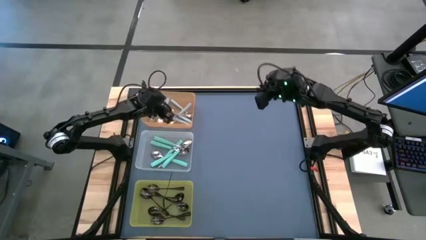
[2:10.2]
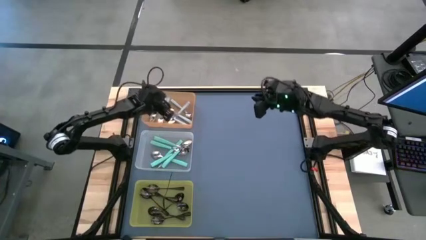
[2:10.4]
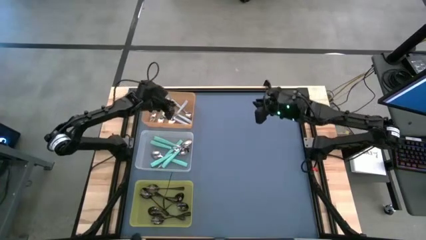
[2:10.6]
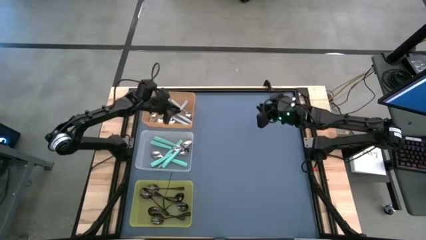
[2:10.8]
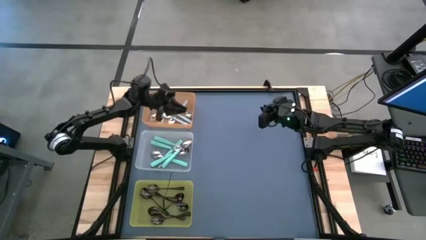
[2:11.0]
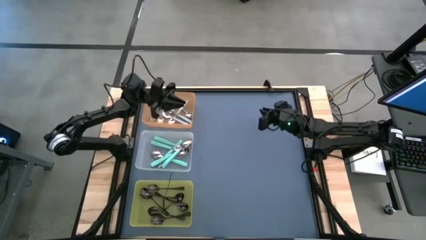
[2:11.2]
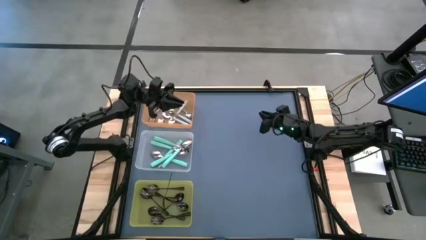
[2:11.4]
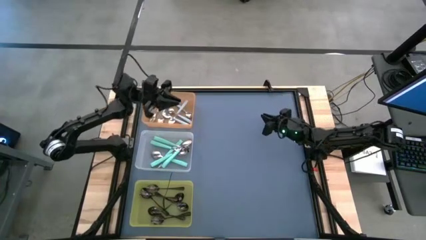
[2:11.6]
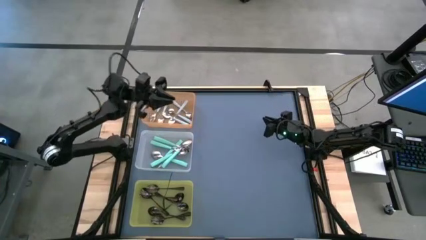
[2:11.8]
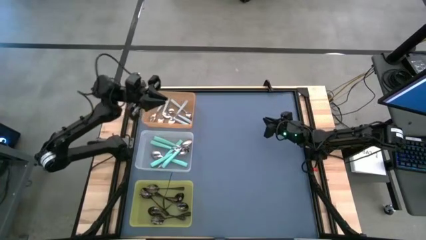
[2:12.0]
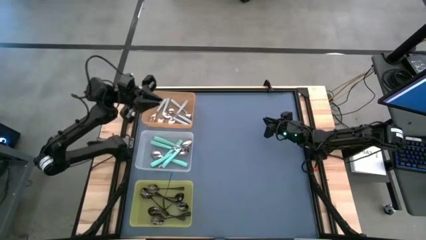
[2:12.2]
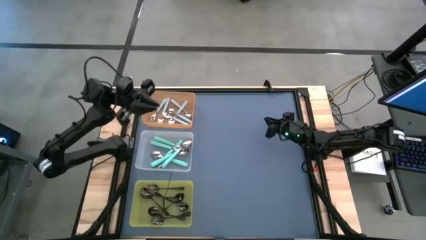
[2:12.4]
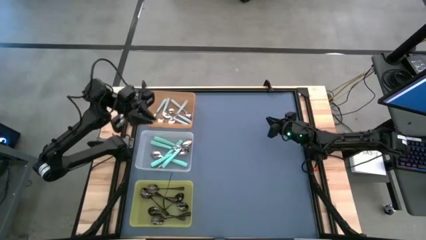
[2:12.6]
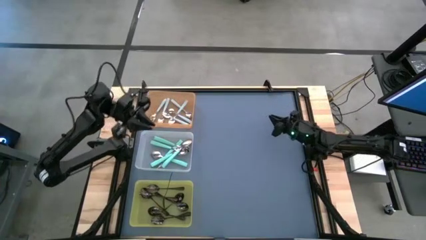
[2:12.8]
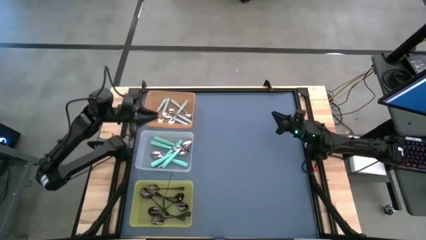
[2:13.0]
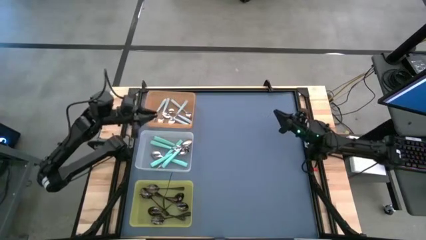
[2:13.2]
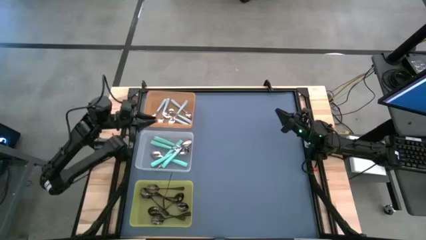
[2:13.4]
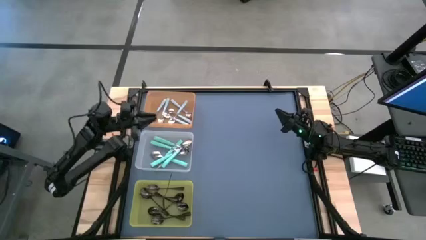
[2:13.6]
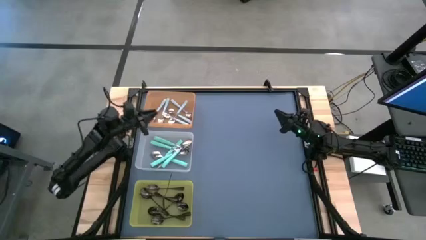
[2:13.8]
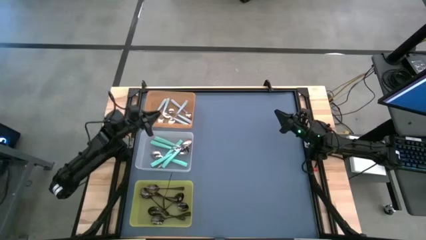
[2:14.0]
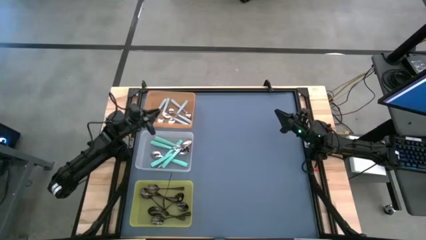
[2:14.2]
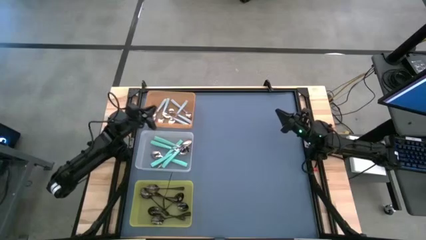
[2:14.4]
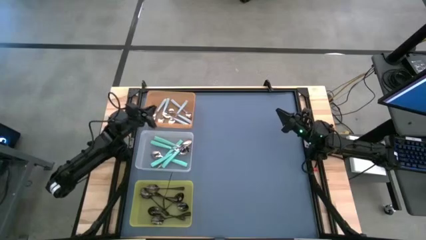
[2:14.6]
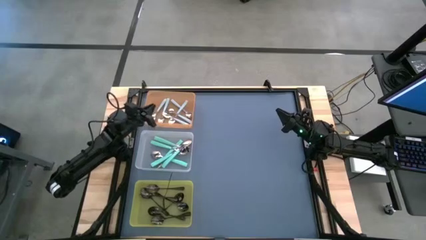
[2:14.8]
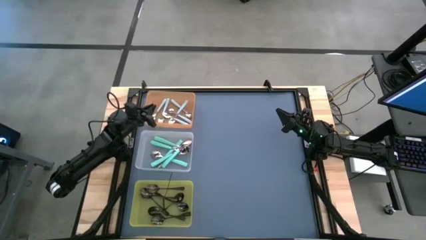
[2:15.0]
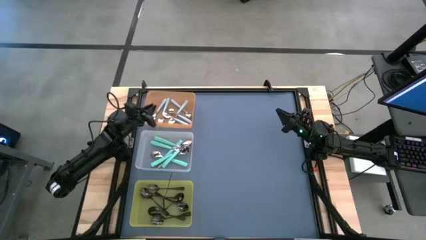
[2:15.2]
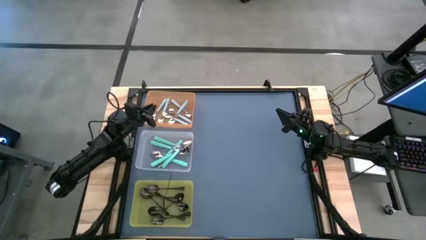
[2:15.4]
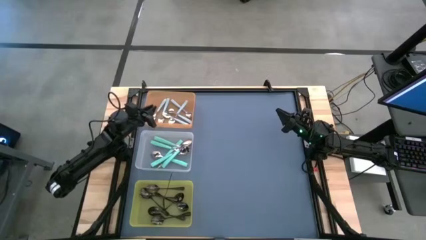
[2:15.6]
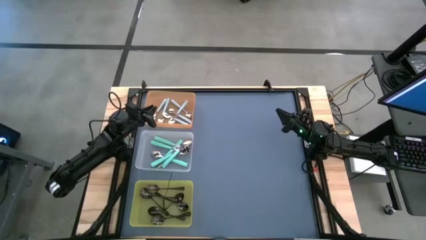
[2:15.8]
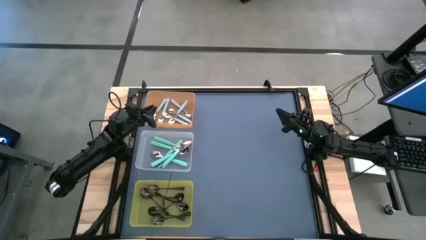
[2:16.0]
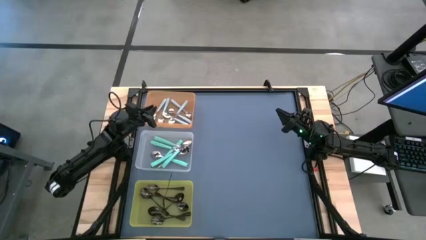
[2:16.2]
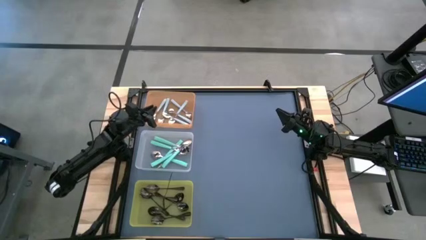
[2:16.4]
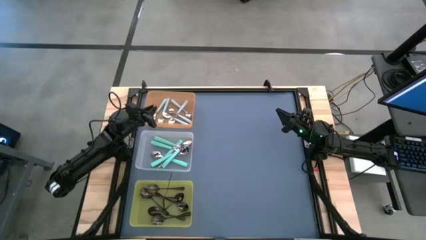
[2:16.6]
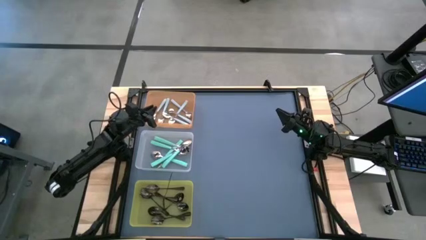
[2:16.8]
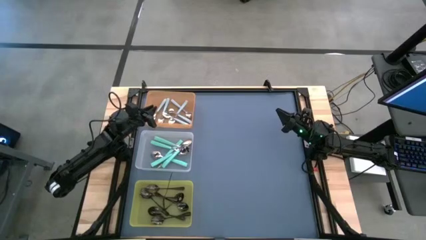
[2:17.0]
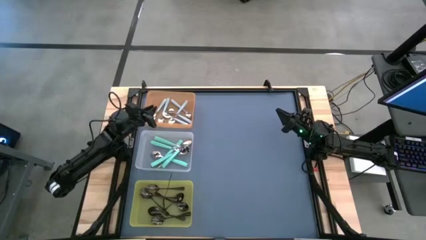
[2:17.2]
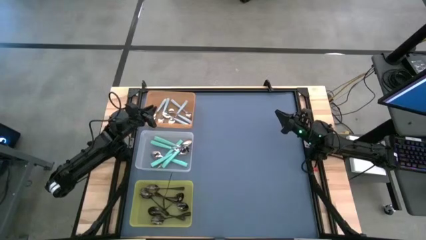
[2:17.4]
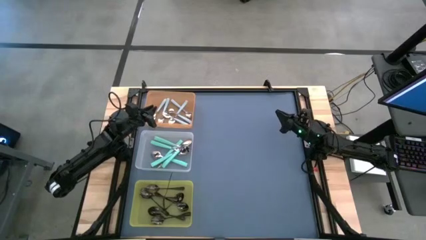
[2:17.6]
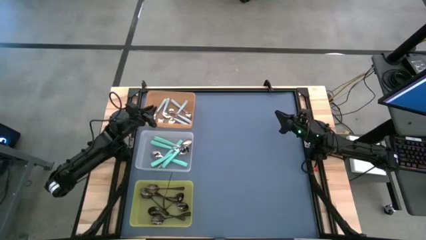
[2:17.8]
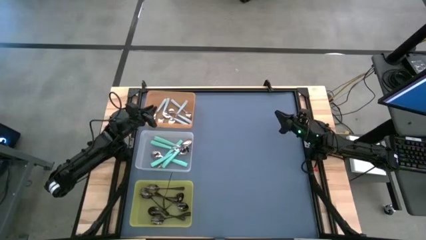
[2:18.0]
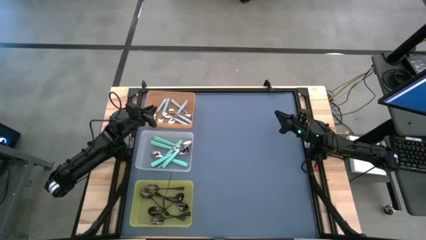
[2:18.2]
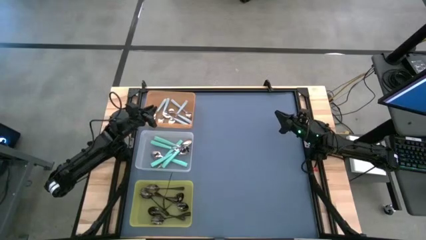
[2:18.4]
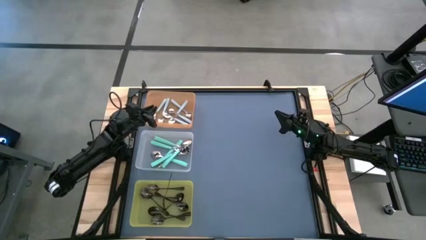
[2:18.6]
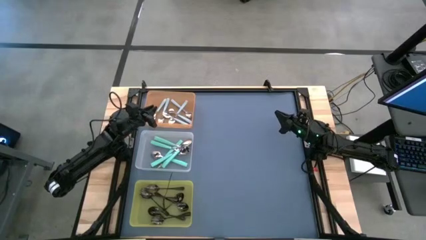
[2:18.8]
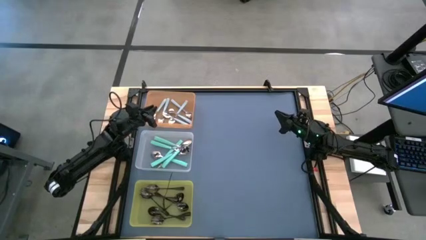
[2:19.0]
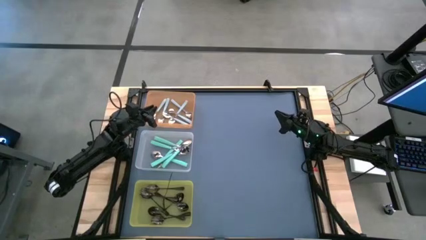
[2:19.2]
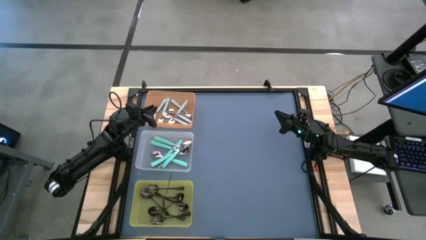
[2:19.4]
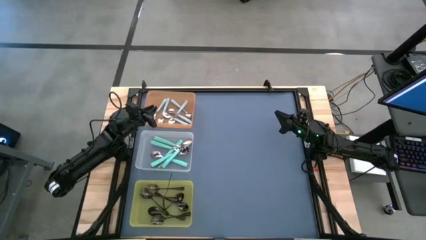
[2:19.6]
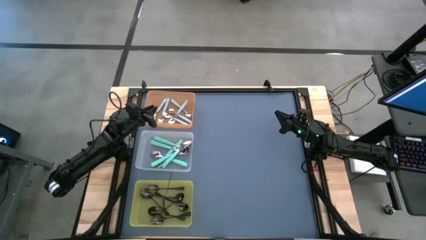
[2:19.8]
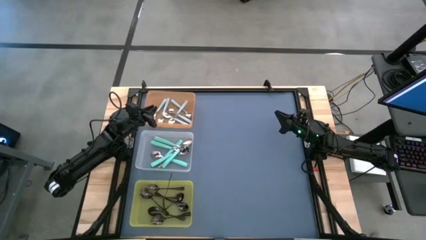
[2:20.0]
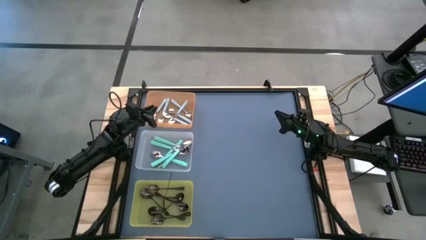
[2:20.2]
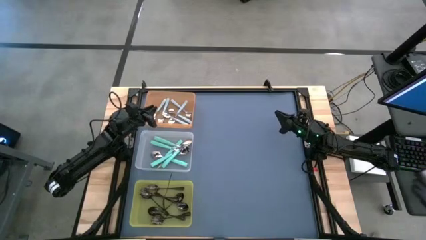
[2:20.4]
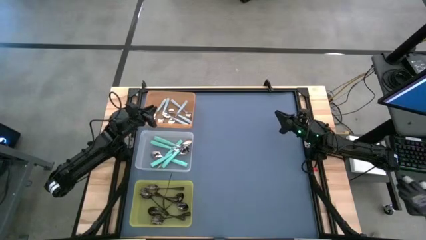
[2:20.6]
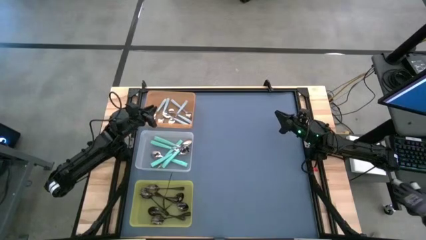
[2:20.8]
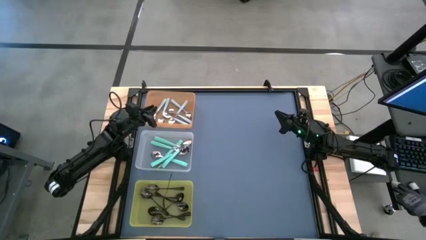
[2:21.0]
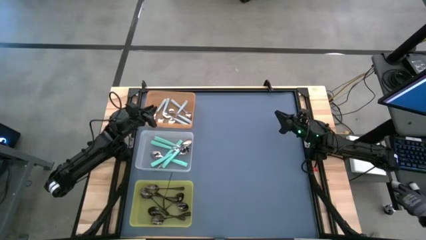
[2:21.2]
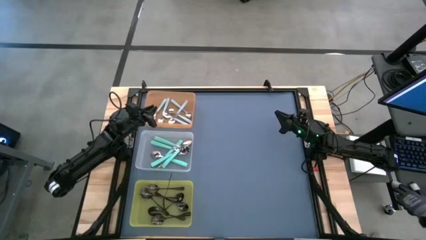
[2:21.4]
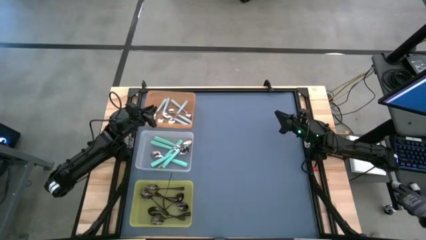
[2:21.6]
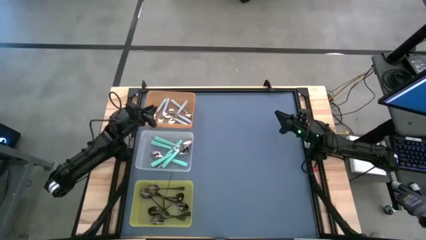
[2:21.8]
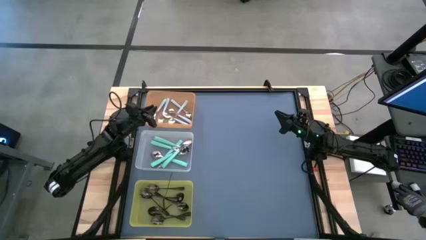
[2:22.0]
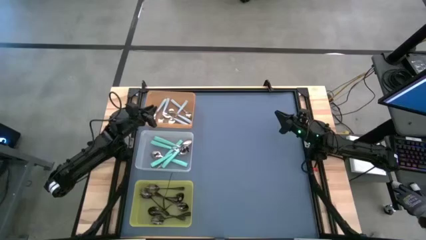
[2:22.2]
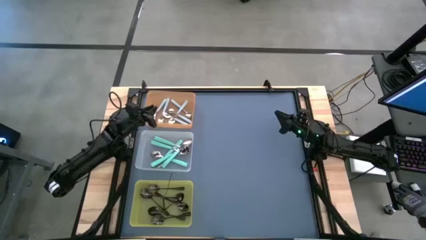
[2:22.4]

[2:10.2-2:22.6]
Task: Sort silverware by color (type)
Return to Home Position

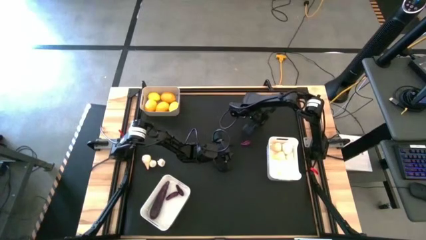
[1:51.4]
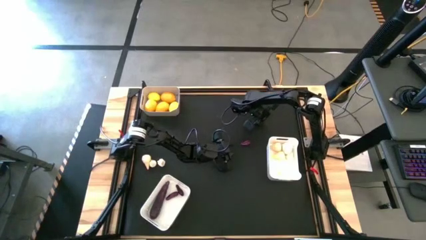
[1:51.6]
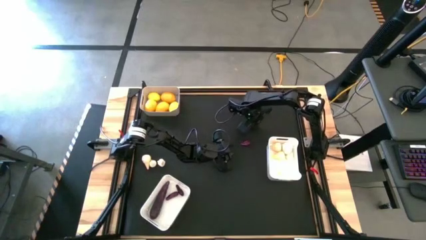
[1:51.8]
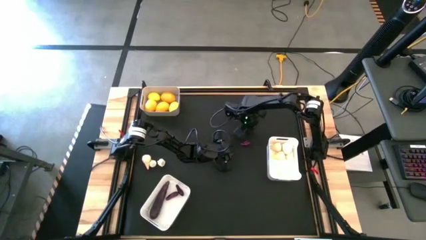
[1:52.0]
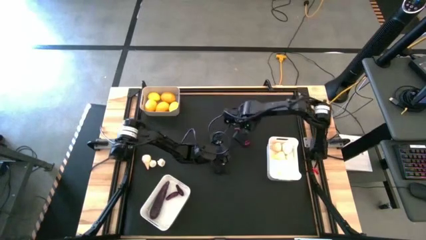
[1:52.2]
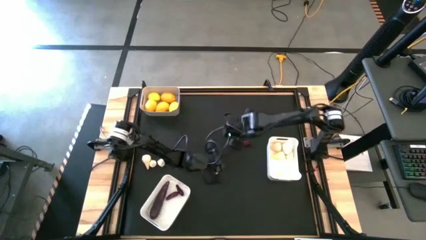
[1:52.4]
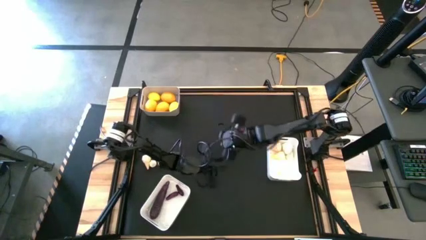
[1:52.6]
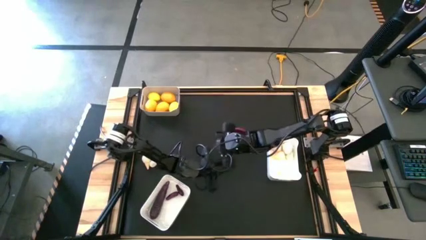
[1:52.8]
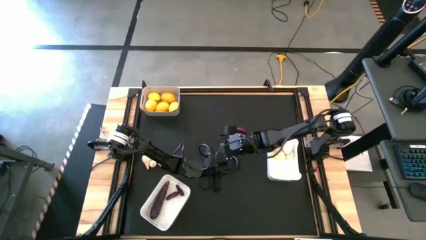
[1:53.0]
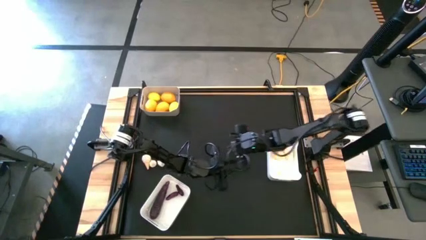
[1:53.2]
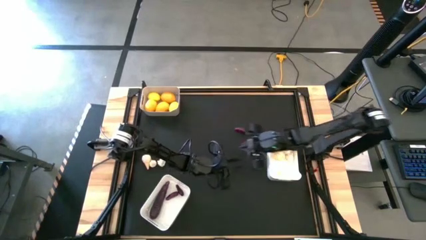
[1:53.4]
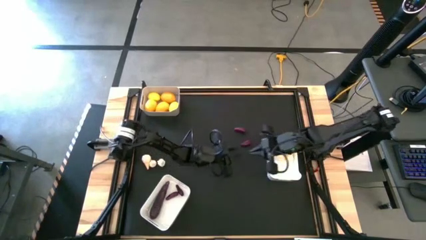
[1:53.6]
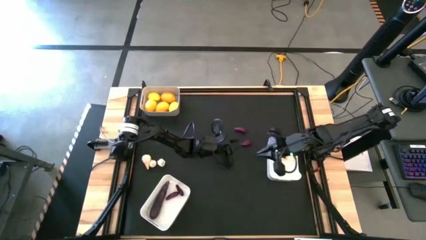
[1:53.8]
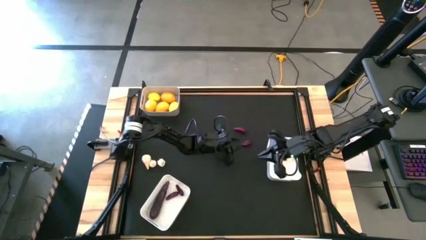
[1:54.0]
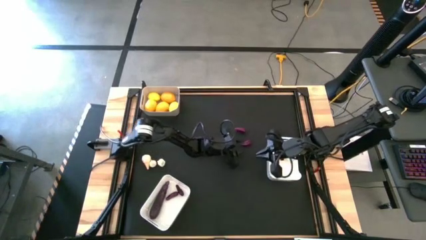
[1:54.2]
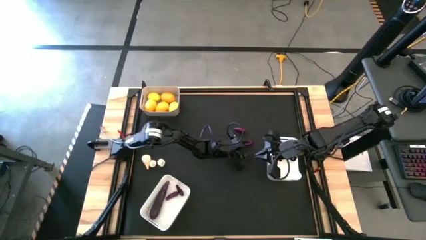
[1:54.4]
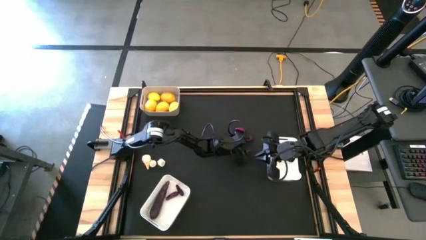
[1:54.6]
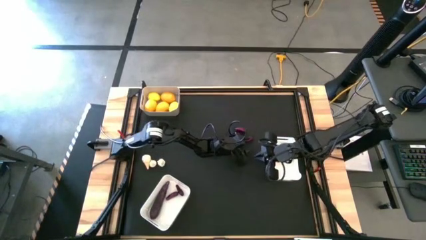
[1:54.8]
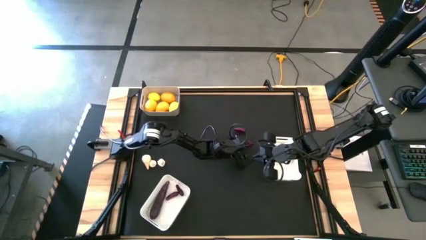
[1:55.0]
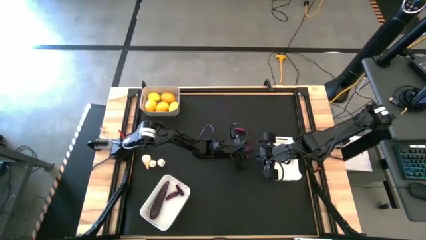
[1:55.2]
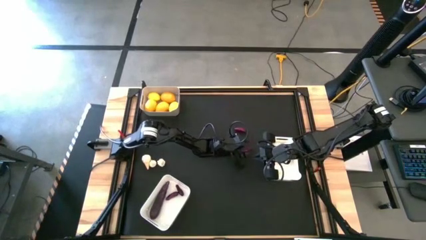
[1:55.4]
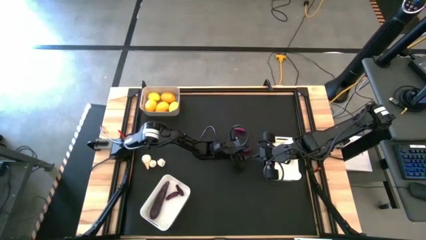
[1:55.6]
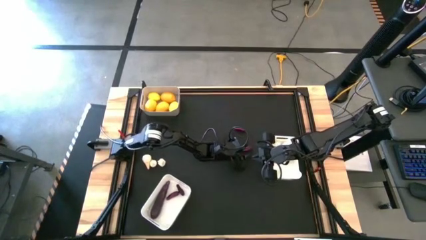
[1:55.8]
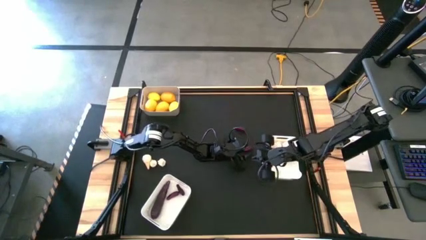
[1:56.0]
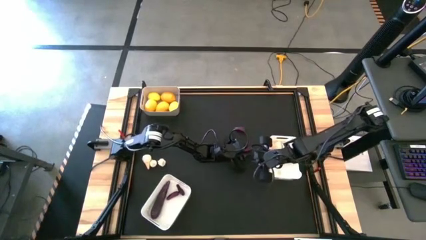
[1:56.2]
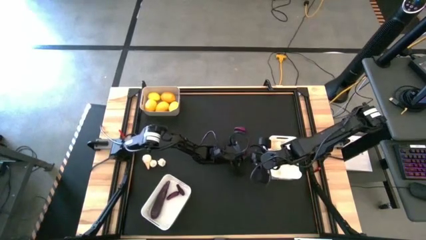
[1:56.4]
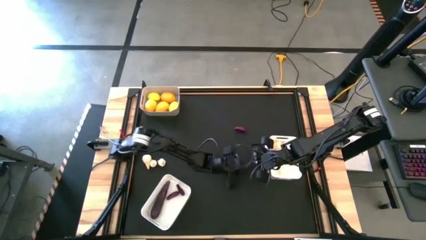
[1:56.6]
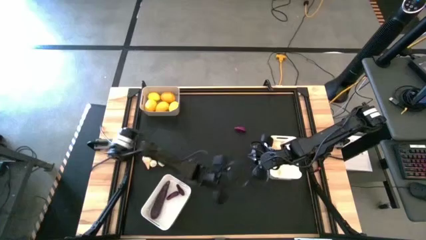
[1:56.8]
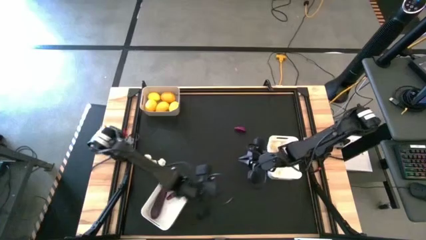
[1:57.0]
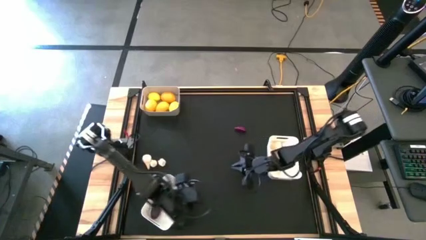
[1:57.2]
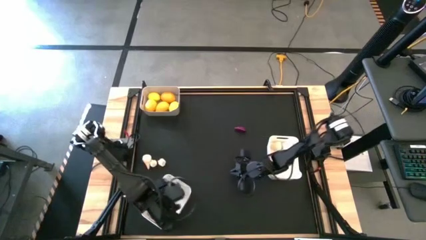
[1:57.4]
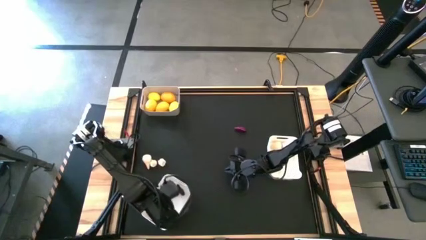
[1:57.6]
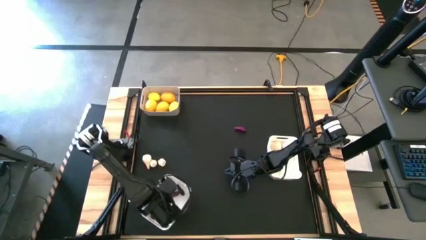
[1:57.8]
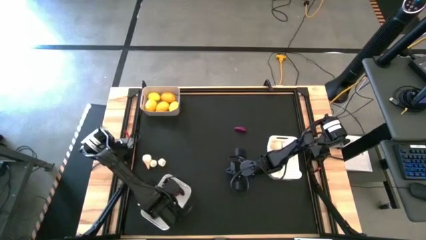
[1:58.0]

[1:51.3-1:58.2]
Task: Sort produce into baskets
Put the bottom eggplant into the bottom left white bin
